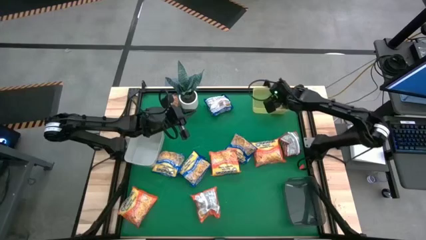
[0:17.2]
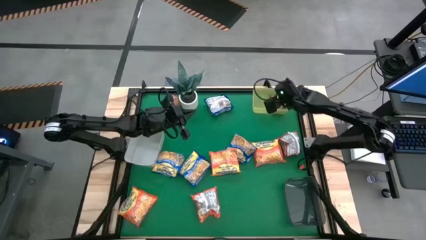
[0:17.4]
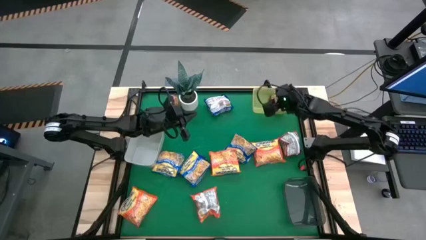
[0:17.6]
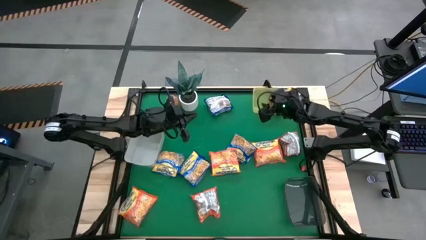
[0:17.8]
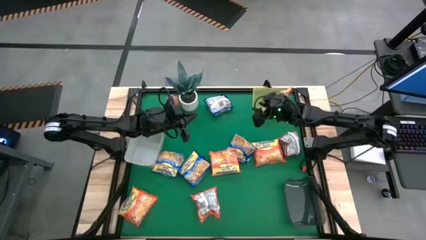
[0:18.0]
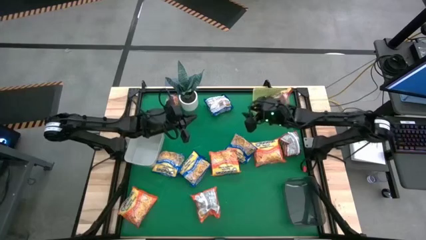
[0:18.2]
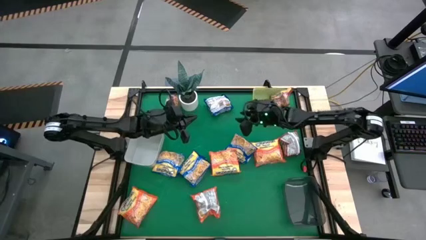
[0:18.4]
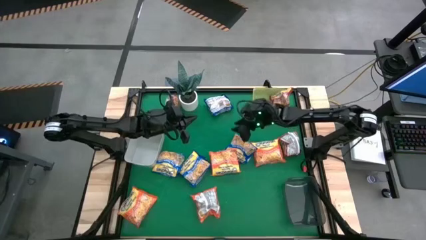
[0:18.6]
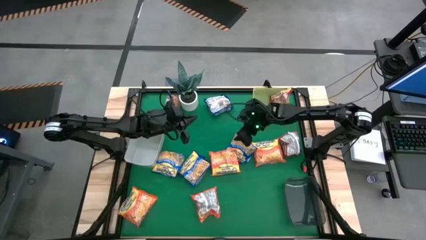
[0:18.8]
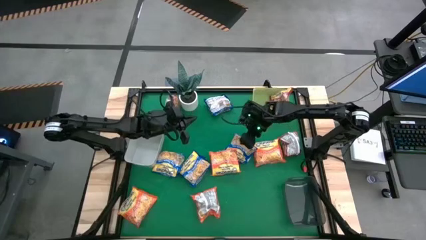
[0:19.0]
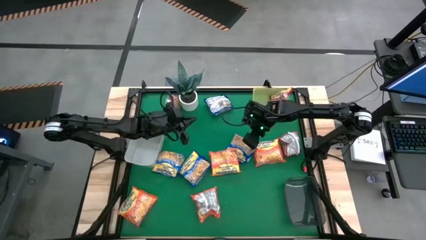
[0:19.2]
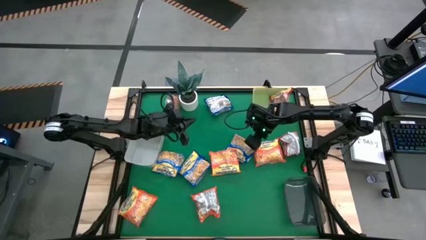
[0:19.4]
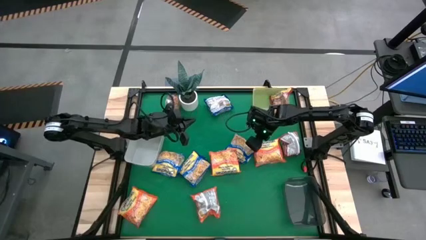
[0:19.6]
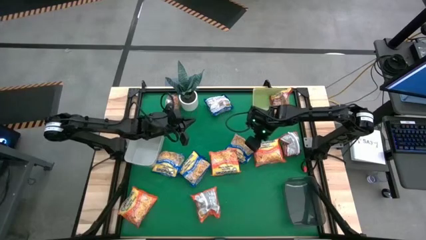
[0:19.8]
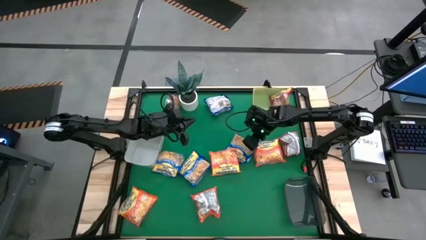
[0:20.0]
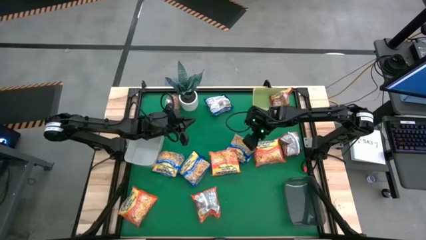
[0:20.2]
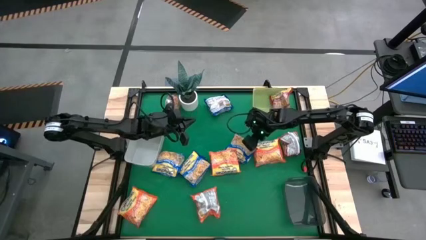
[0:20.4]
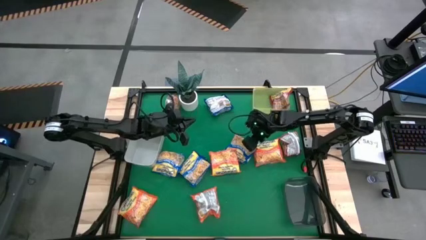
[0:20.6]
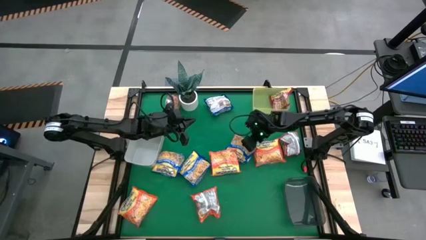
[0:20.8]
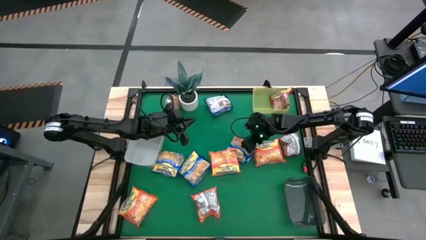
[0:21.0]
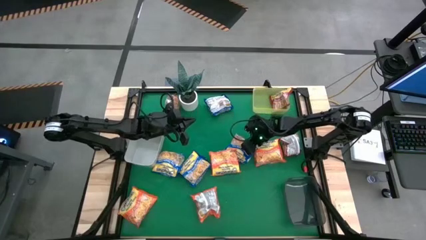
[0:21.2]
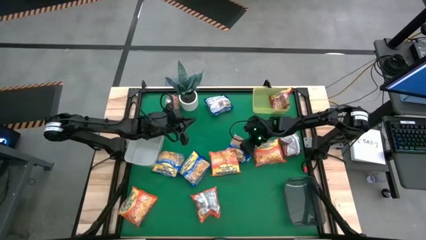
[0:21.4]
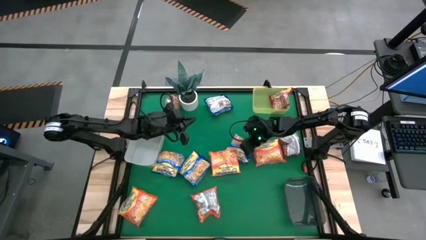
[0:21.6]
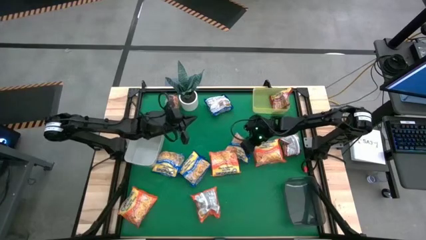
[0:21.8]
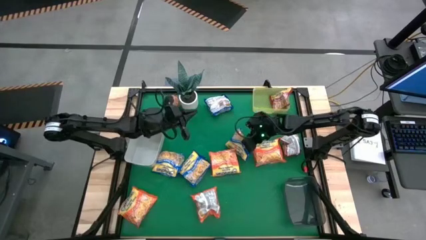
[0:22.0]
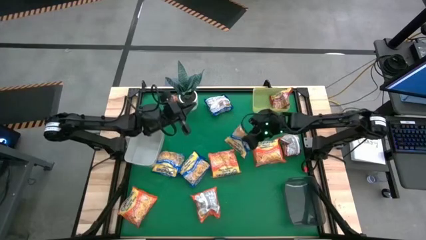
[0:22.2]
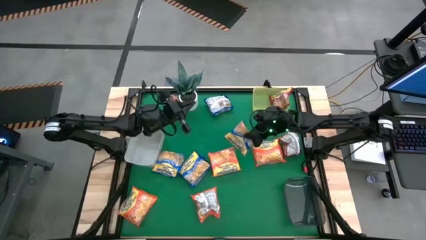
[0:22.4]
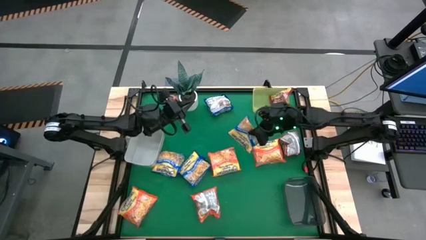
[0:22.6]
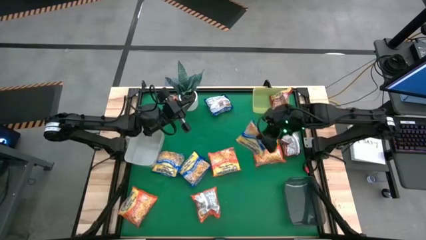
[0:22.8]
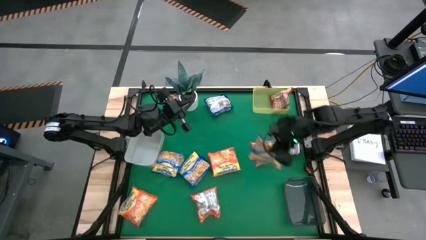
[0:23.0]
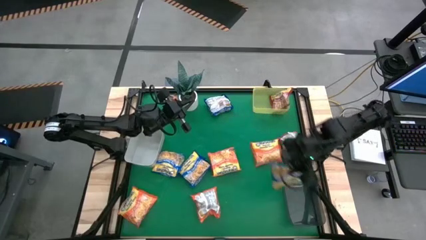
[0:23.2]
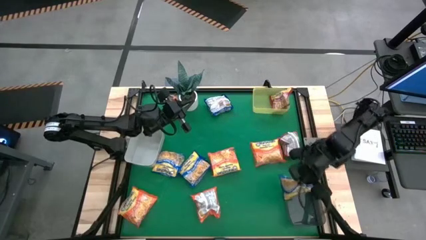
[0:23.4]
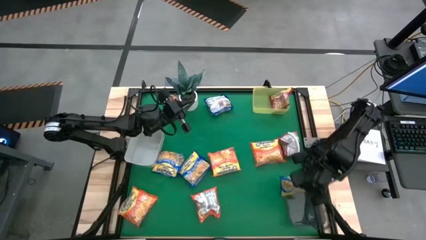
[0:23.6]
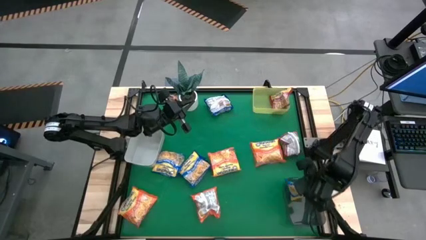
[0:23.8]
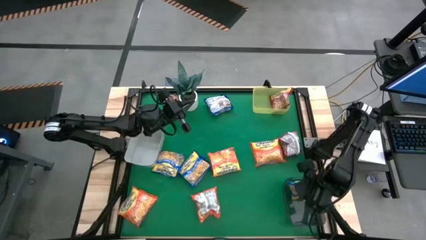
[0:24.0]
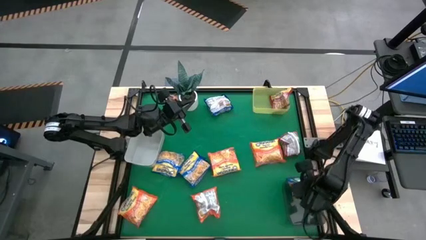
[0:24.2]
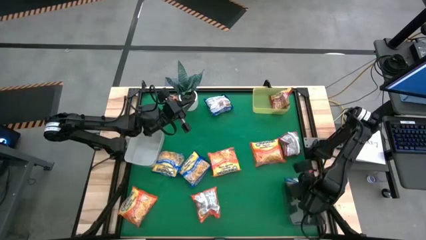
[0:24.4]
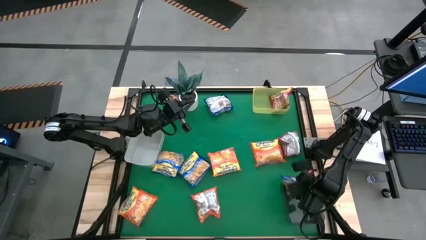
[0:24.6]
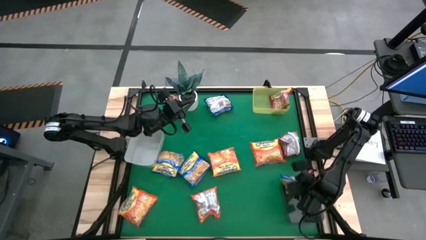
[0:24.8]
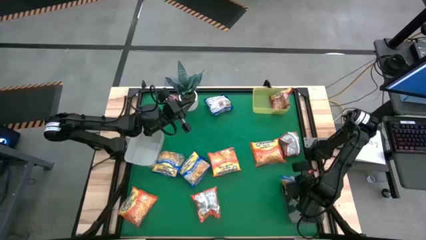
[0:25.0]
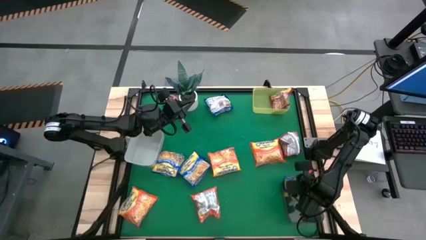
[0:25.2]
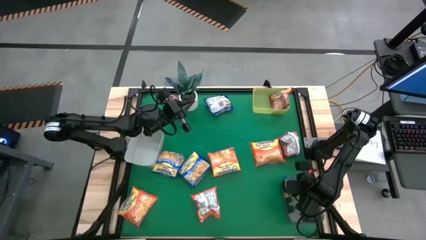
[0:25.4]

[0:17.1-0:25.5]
Task: Sort Maruchan noodles
Put the blue noodle pack into the black bin

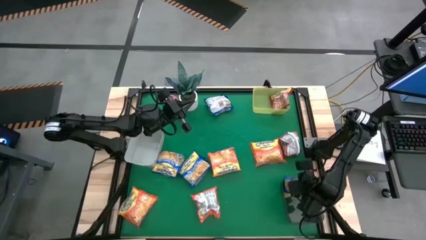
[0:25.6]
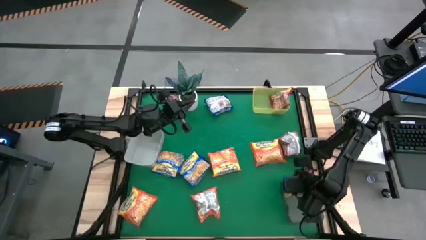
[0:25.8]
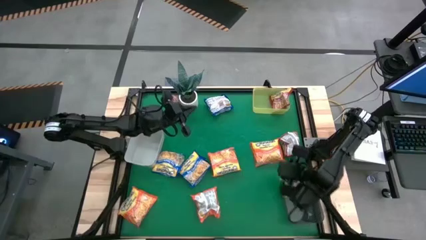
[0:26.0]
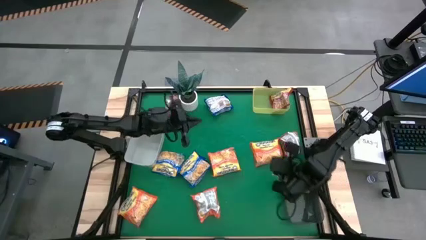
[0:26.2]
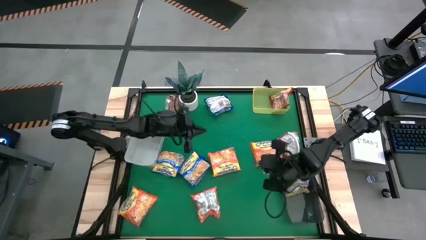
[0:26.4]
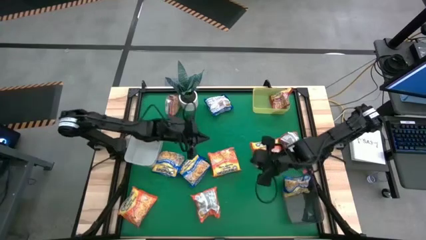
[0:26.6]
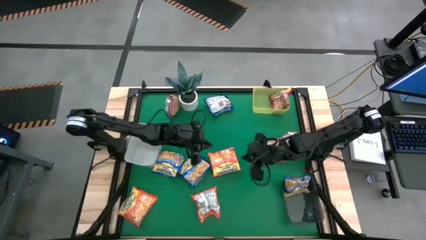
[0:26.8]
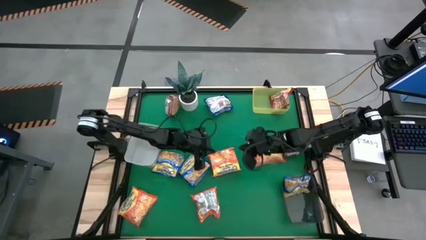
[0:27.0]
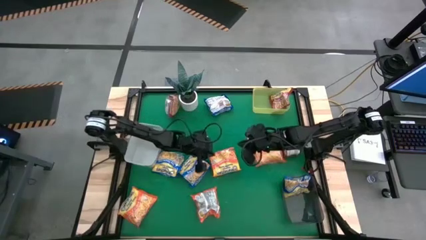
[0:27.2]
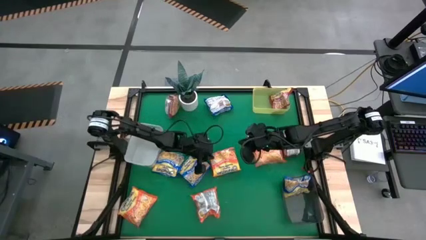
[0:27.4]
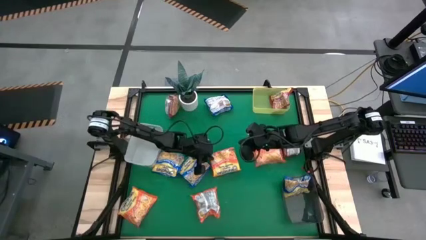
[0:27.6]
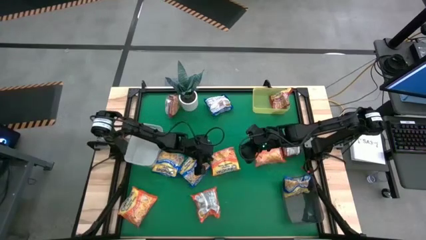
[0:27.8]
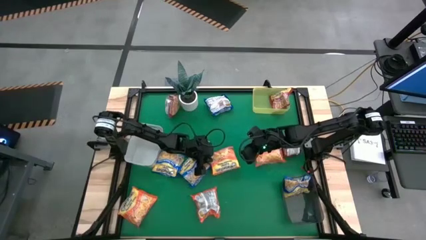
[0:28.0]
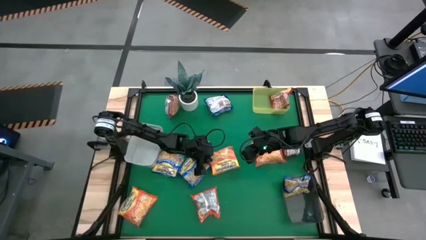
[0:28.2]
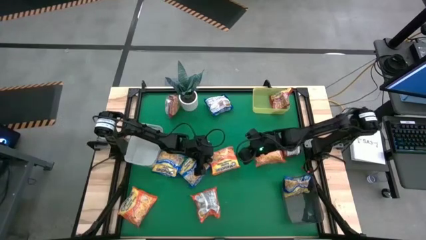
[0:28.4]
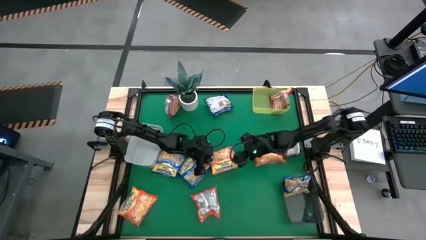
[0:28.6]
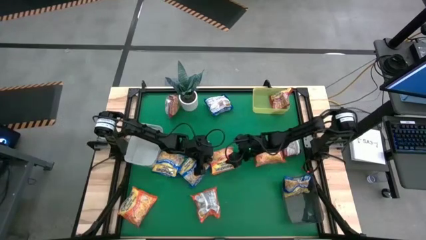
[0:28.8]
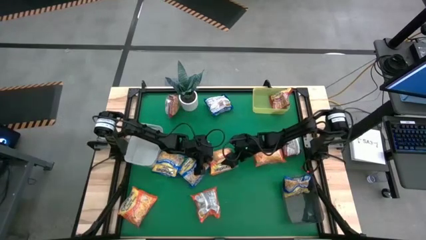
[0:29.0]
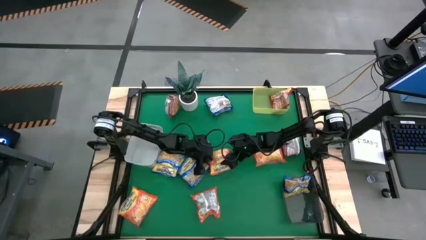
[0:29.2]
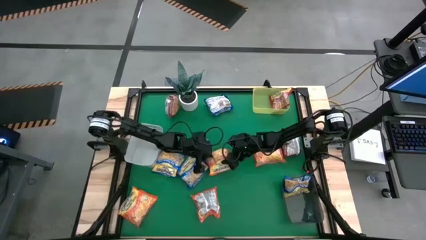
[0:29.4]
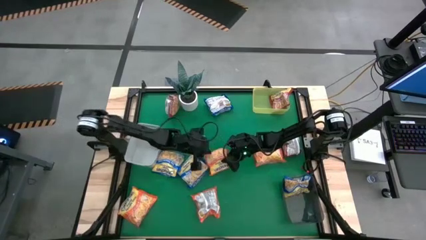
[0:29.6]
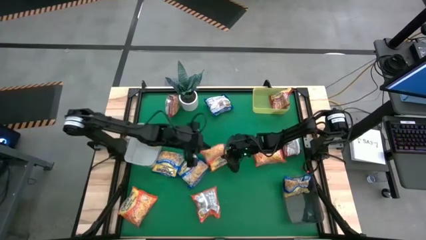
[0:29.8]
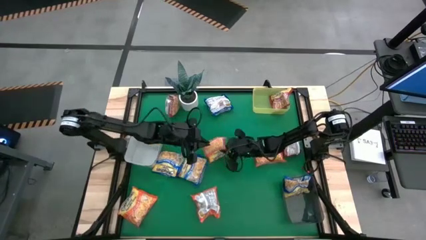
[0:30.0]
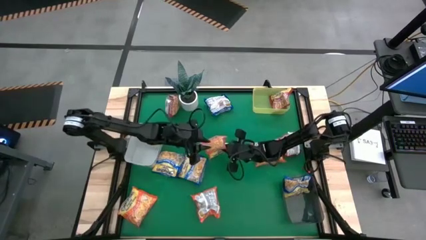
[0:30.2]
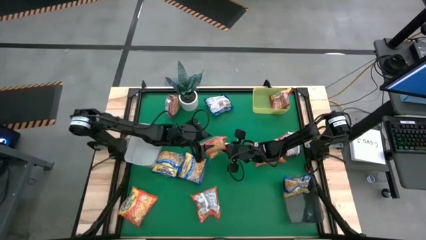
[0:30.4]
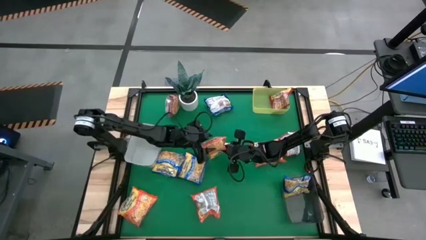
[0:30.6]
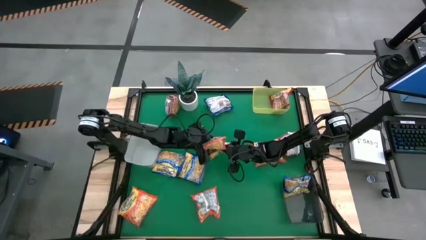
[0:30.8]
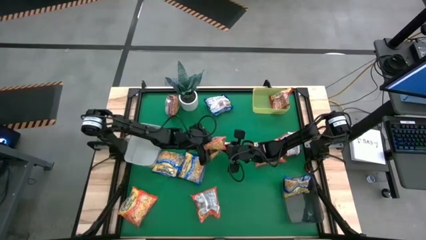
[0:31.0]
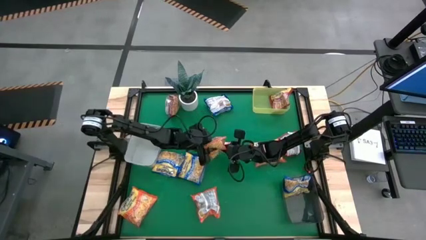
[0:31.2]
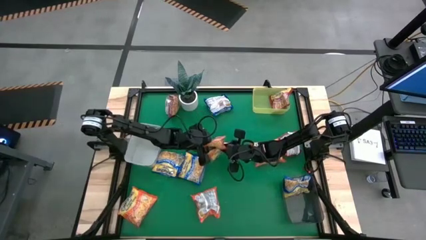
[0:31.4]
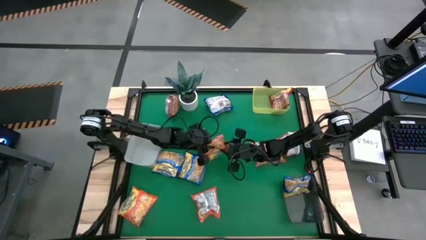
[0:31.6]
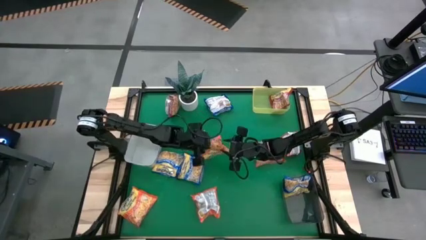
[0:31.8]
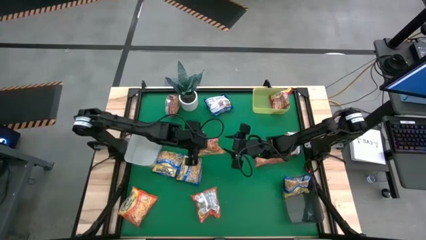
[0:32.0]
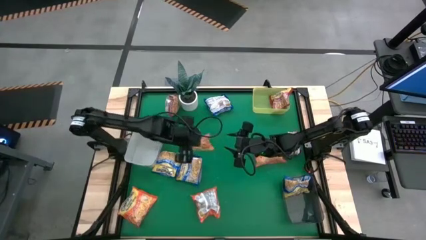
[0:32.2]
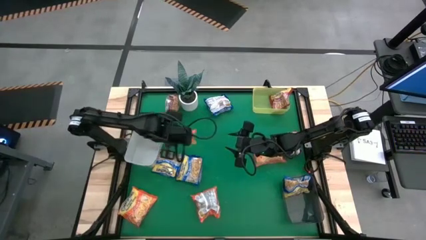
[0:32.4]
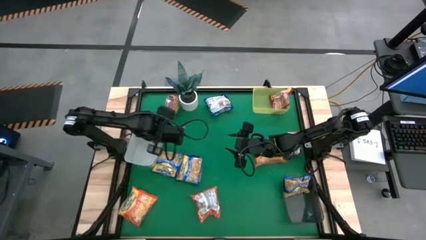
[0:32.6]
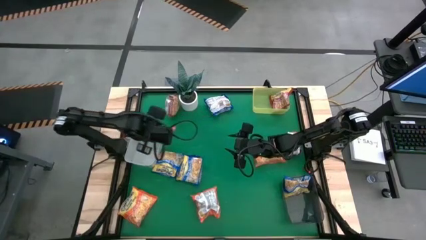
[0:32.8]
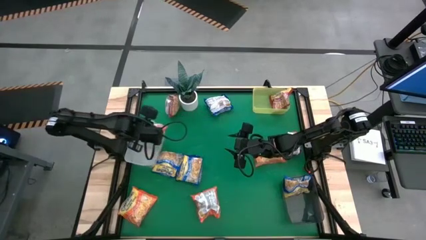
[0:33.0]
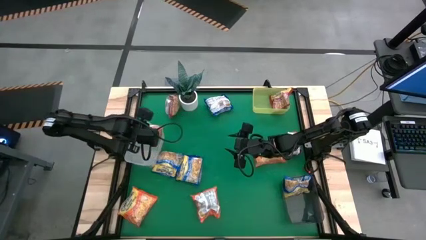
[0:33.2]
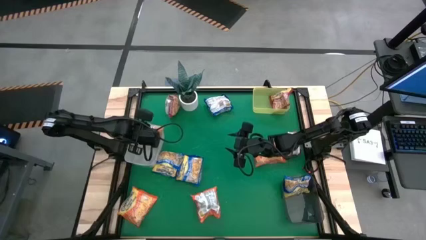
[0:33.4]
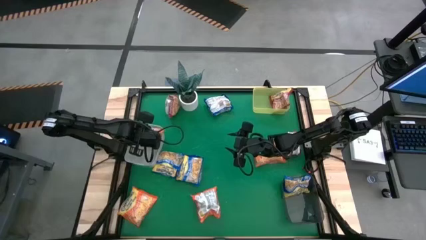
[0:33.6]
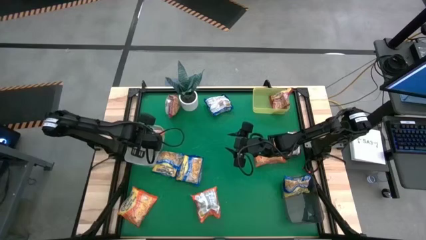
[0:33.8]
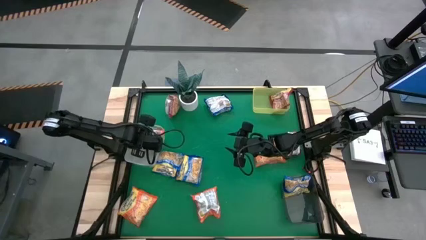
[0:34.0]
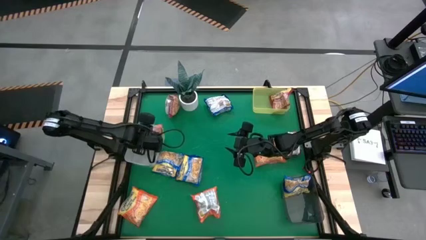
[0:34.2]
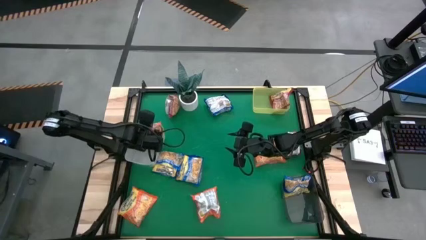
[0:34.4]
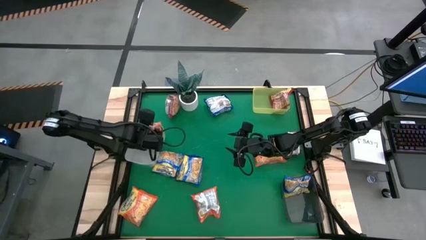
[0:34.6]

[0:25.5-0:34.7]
Put the orange noodle pack into the white bin
